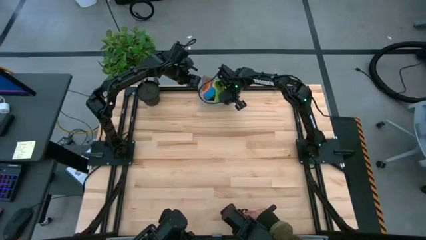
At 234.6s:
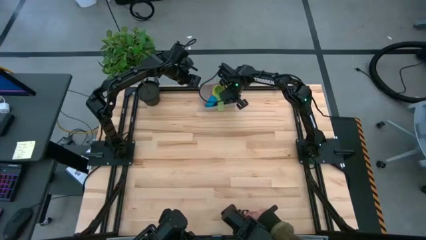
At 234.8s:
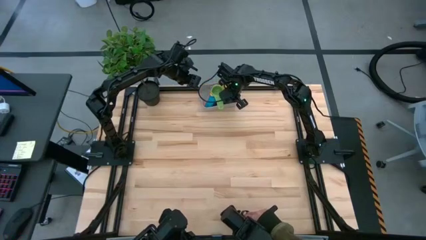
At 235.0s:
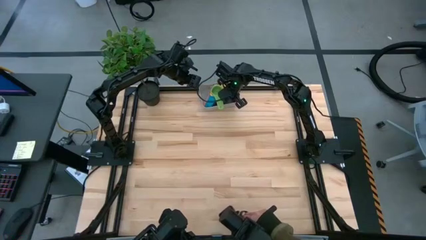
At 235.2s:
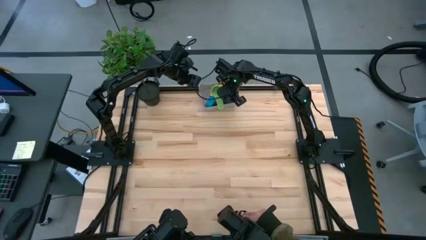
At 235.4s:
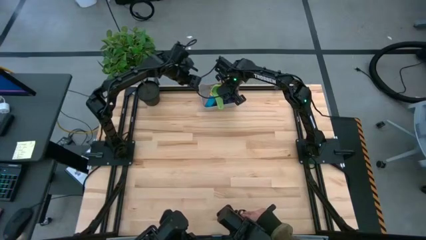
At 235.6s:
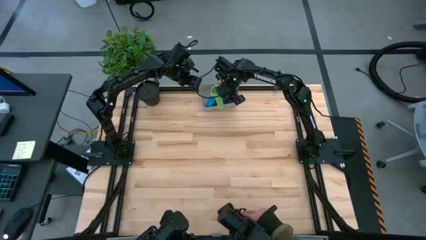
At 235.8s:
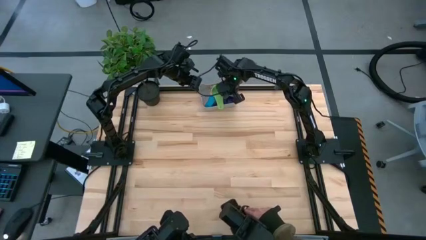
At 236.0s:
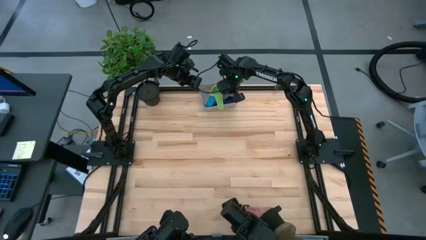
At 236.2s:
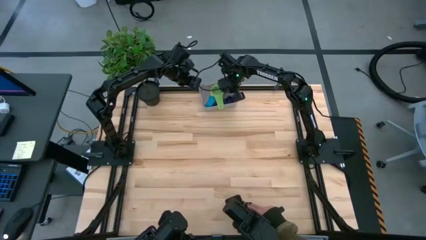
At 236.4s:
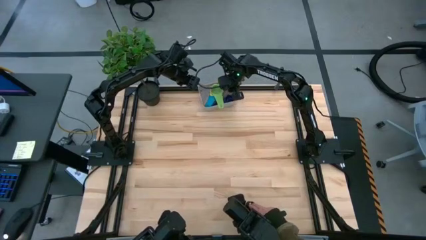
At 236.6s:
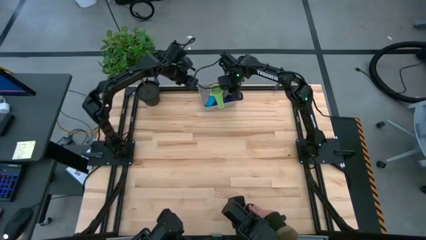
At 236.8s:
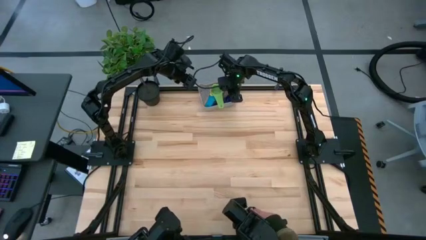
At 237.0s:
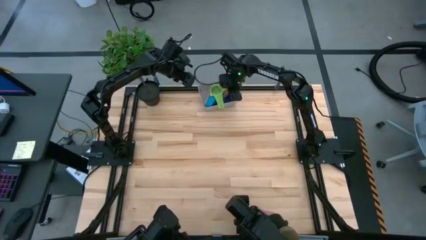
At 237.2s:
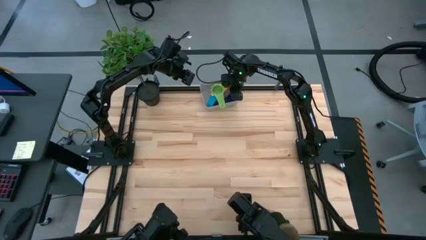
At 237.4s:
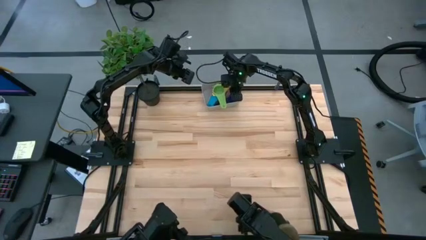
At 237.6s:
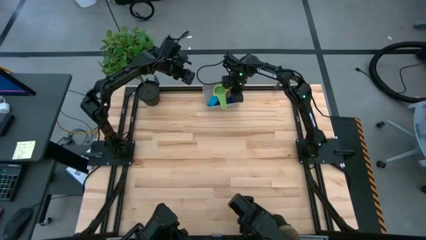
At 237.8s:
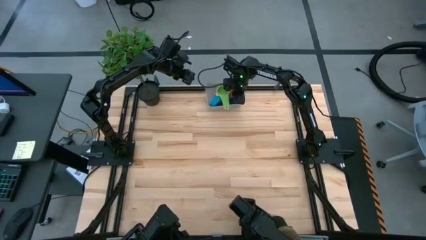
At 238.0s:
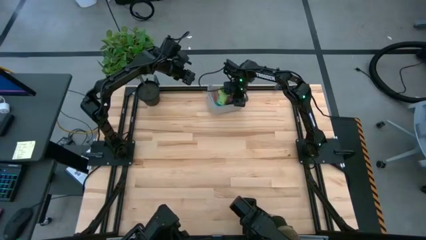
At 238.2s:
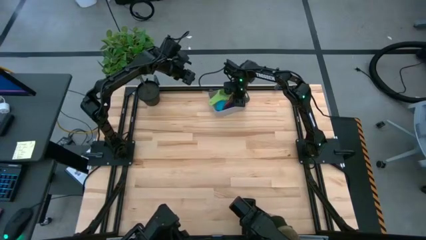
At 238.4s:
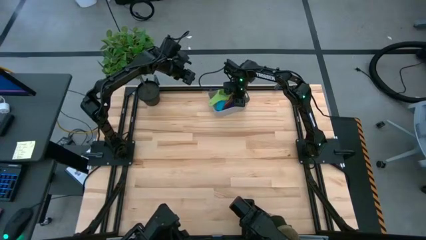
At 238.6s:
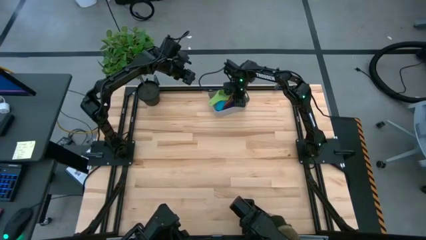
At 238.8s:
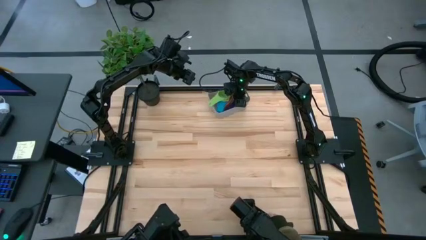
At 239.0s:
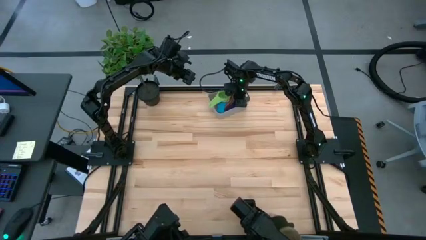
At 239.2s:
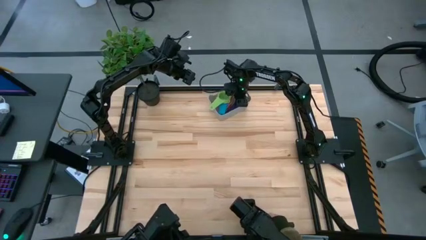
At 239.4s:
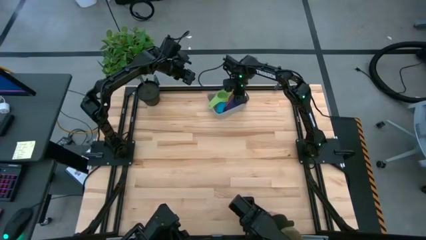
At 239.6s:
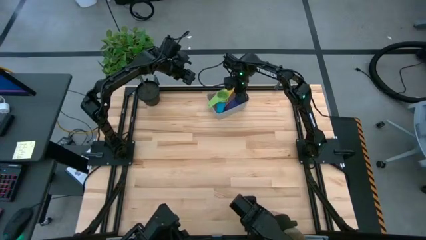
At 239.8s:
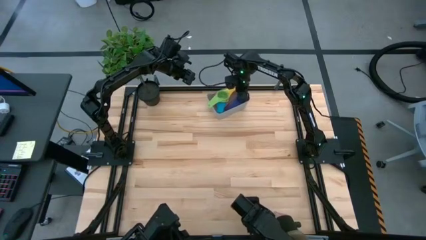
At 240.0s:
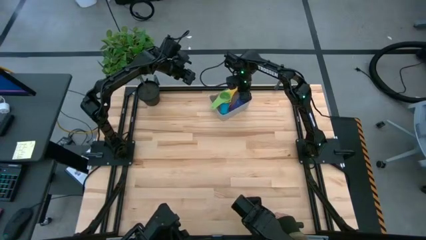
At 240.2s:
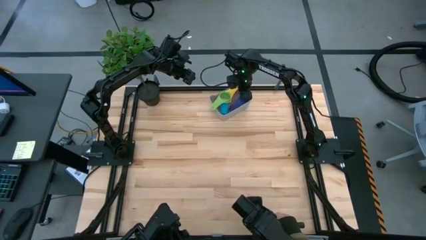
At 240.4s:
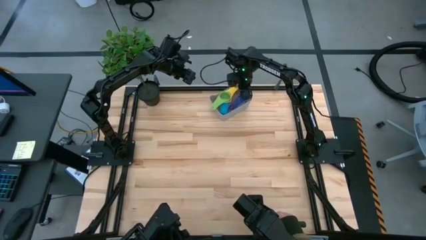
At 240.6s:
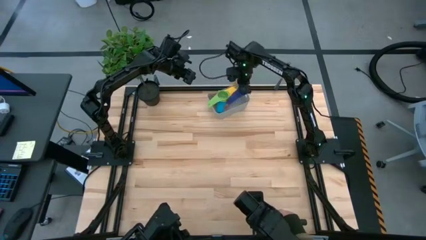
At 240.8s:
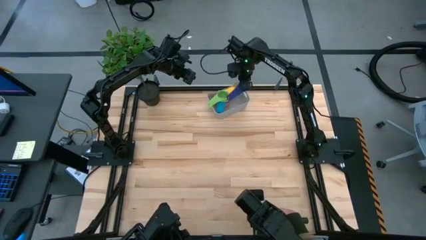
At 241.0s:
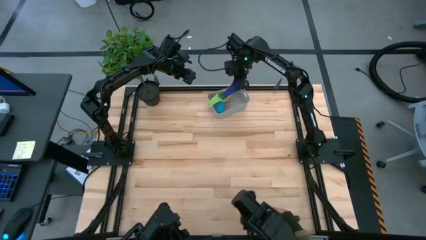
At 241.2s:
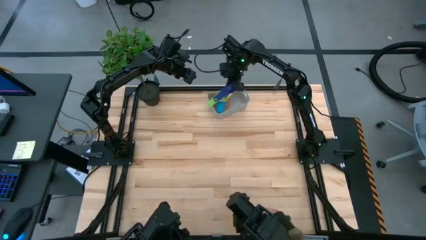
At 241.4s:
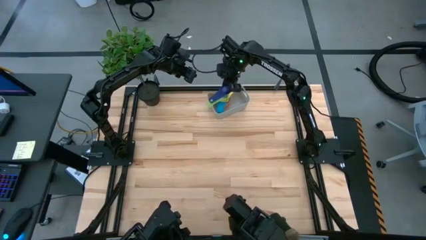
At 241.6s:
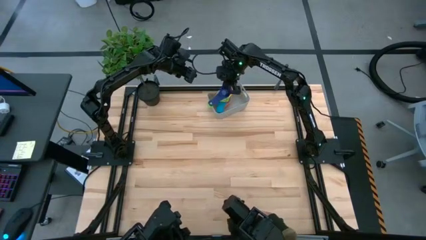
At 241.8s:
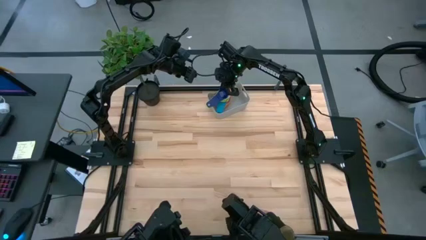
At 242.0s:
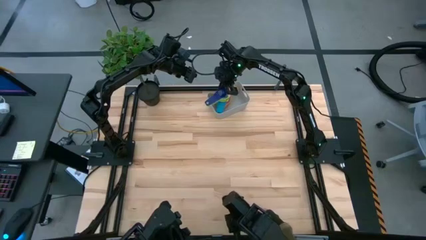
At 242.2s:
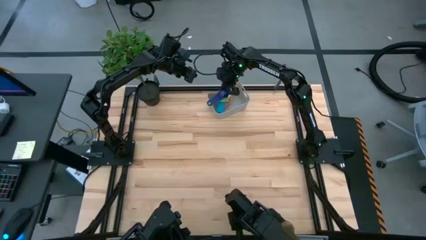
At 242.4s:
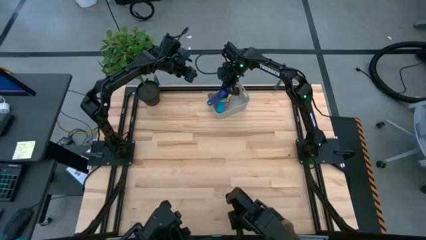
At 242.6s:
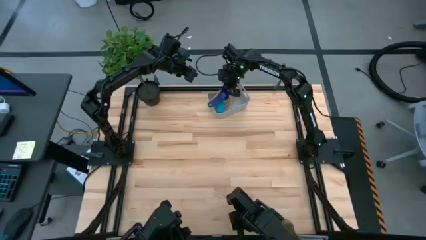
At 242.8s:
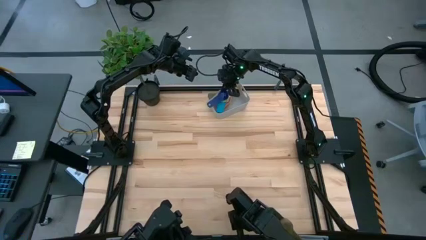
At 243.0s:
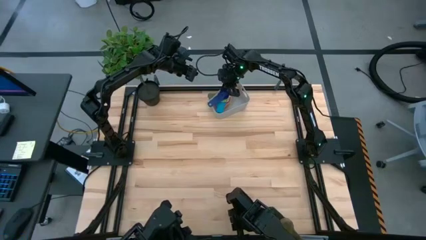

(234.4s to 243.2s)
Task: Nest measuring cups in basket
Stack the dark blue measuring cup on top of the green measuring cup

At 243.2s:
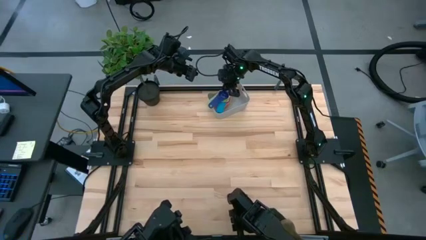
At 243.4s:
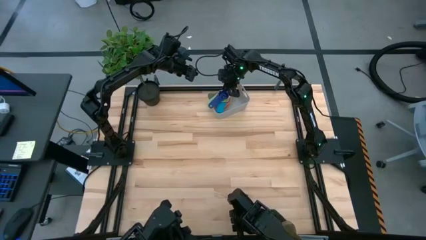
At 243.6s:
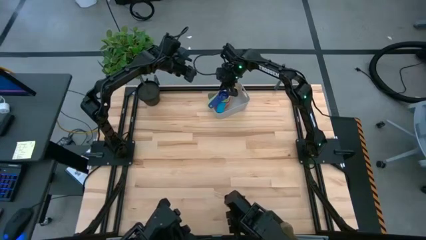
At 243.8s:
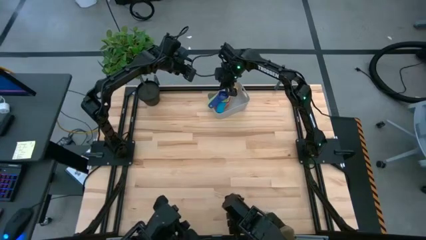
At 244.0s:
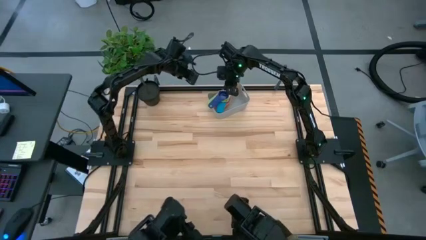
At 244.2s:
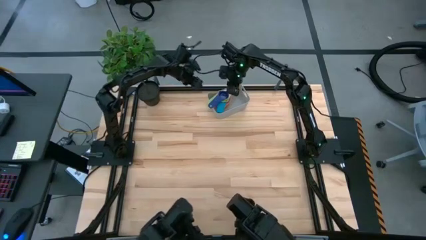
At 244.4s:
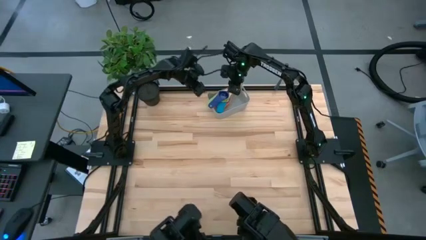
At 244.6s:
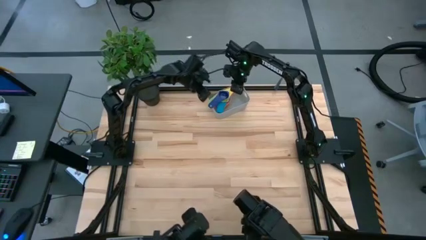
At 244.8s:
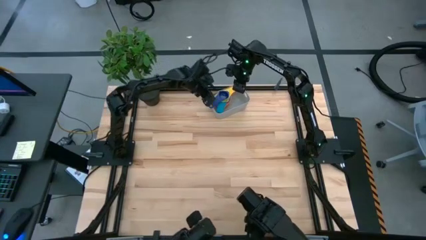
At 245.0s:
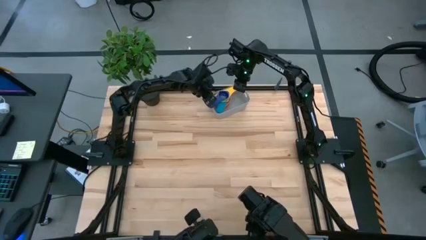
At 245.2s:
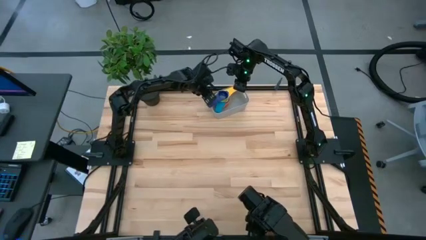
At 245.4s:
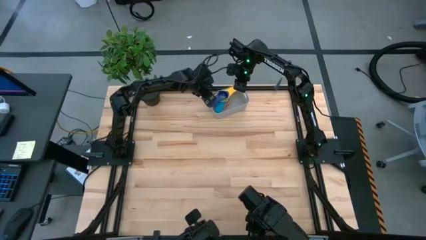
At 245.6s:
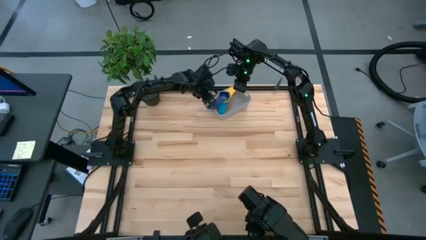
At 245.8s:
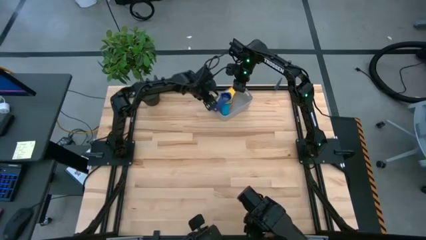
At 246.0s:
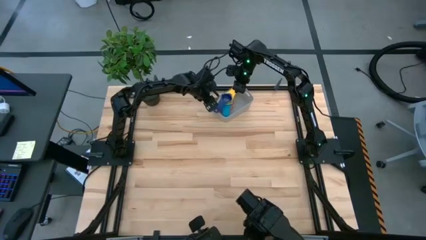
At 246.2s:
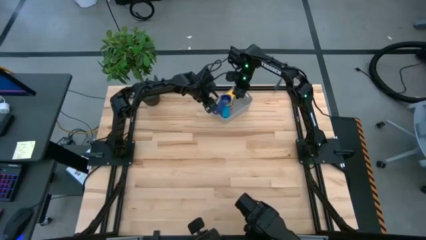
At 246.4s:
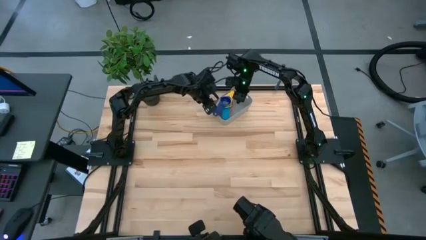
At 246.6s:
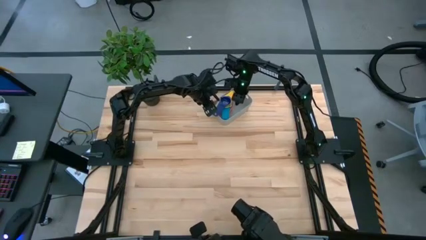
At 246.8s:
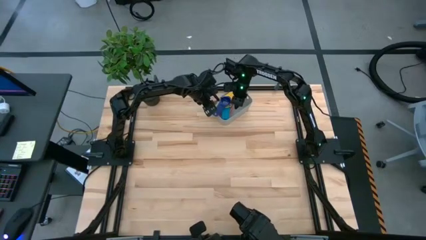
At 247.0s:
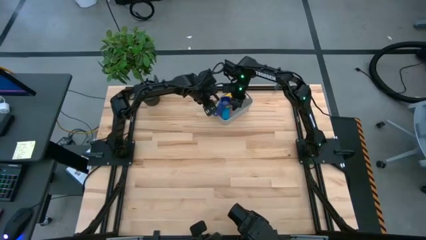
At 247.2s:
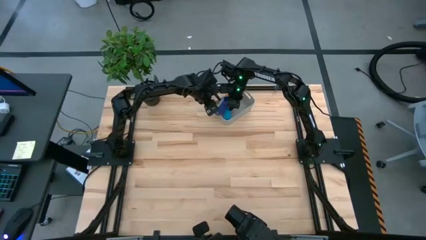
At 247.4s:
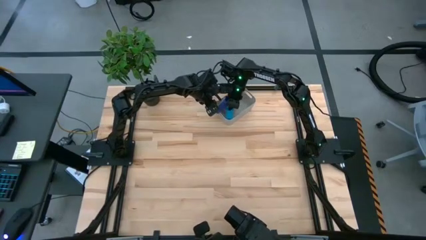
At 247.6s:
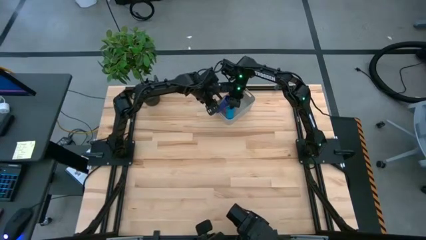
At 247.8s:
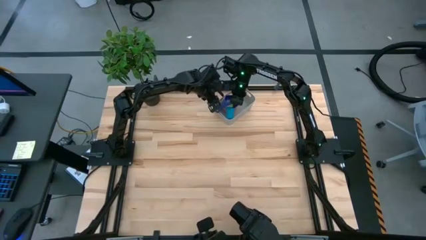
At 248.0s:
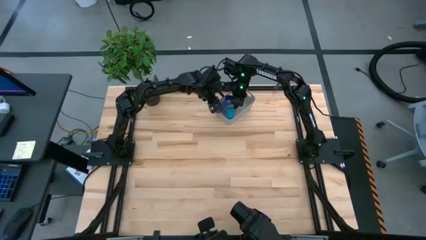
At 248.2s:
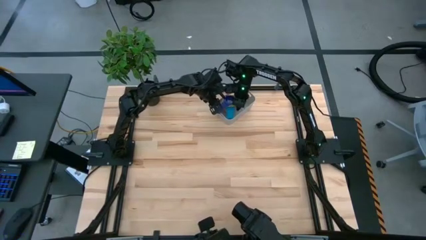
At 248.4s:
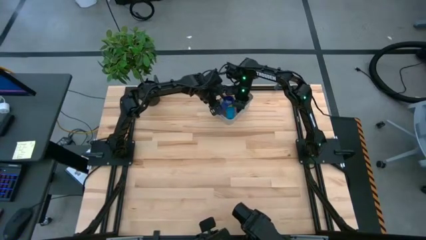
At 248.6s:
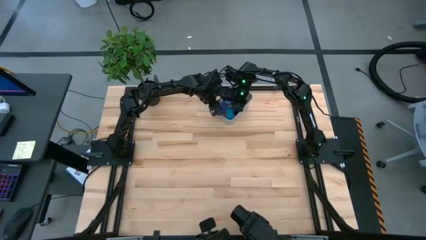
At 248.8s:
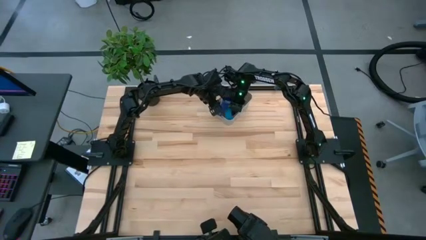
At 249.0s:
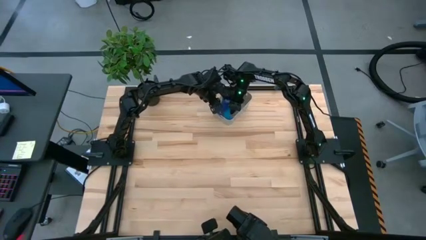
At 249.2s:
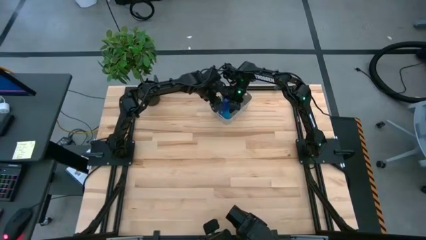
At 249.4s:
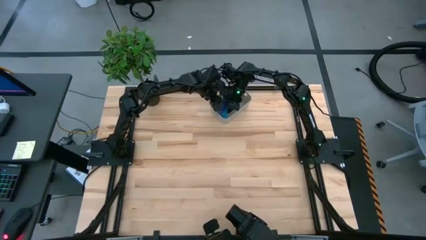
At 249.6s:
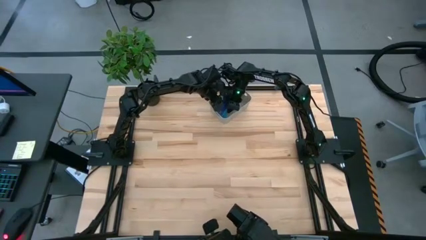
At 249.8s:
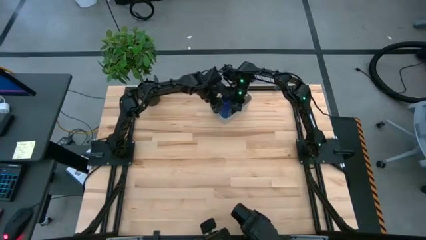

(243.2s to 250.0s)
Adjust the stacked measuring cups in the gray bin

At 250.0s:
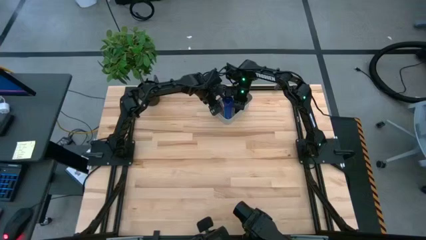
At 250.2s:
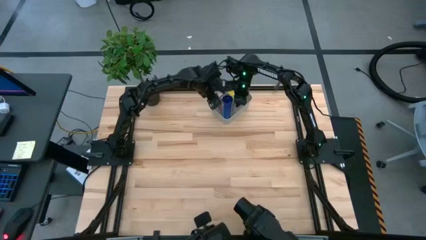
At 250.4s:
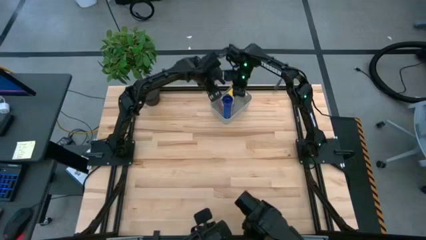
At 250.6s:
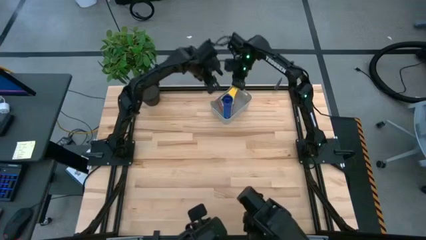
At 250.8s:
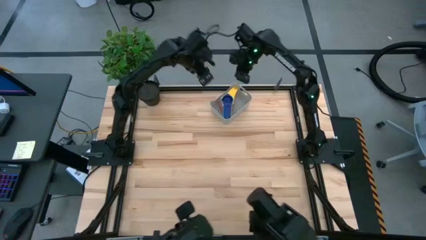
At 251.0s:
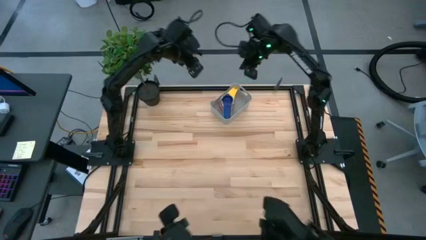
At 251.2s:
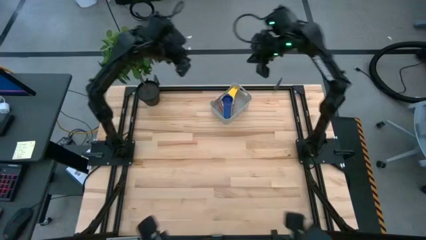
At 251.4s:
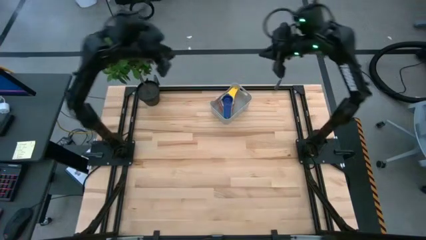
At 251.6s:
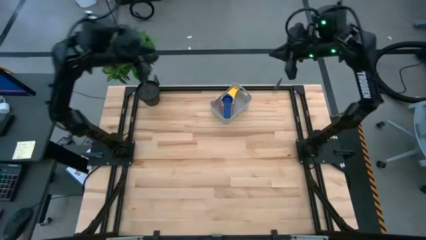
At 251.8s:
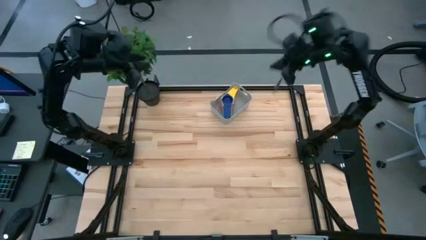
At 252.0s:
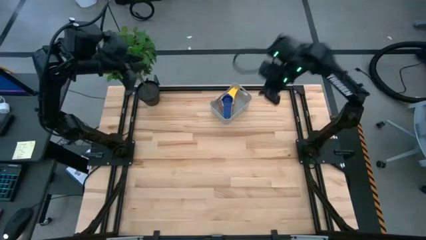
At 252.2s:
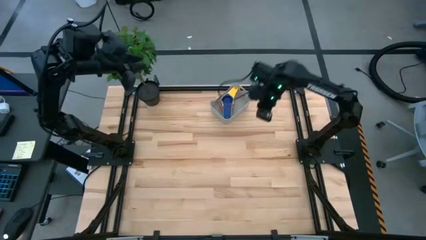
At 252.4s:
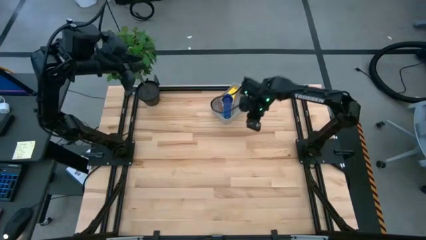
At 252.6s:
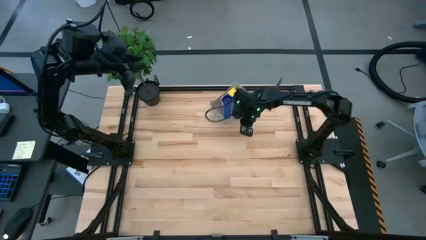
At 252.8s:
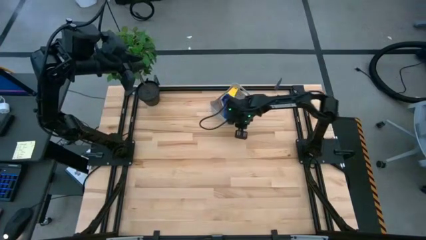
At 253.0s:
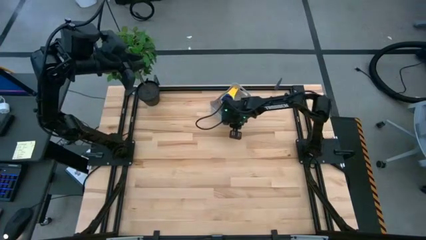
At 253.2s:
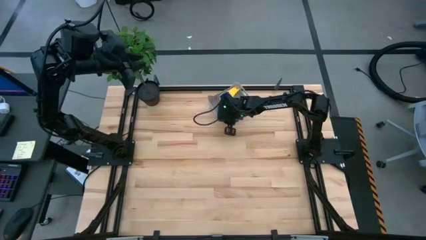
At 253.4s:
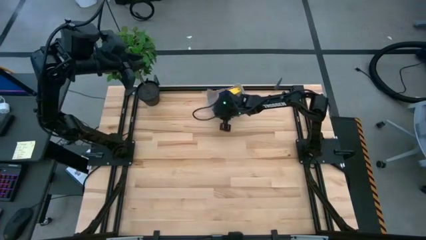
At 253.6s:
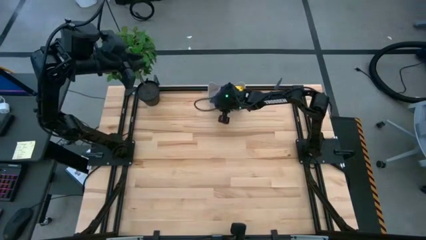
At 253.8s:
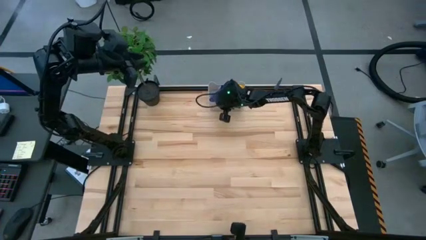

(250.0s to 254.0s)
Adjust the gray bin on the table
